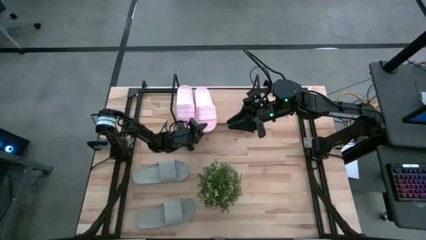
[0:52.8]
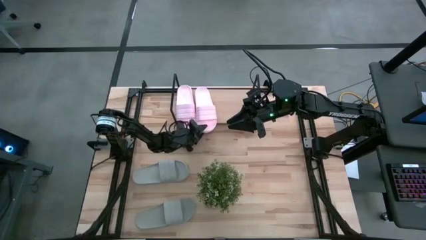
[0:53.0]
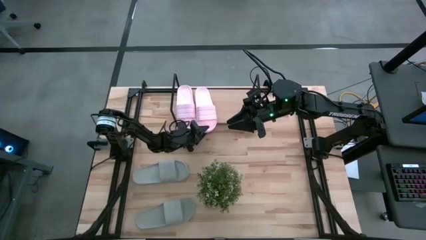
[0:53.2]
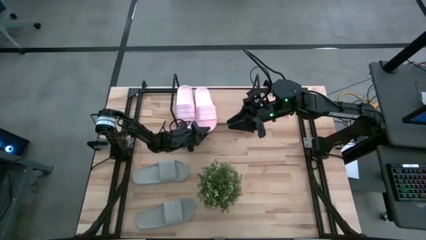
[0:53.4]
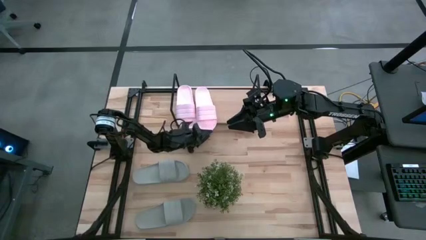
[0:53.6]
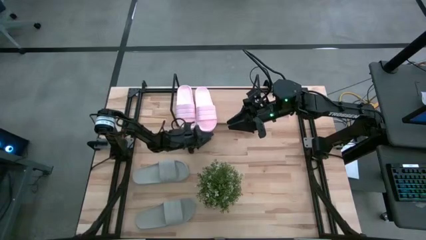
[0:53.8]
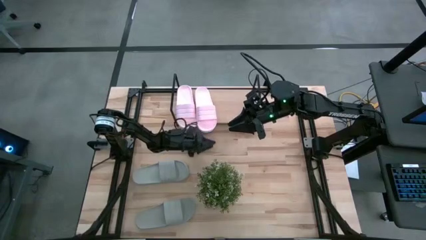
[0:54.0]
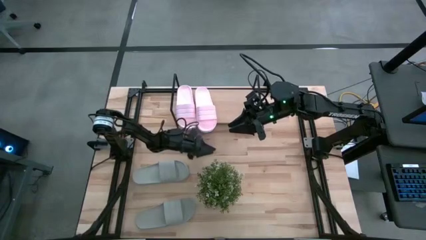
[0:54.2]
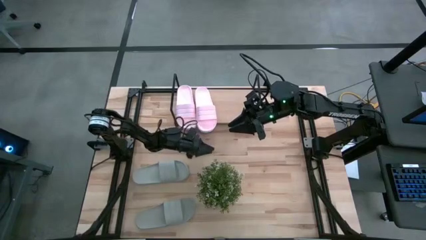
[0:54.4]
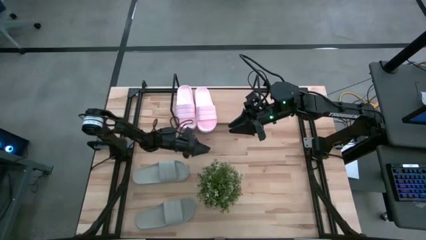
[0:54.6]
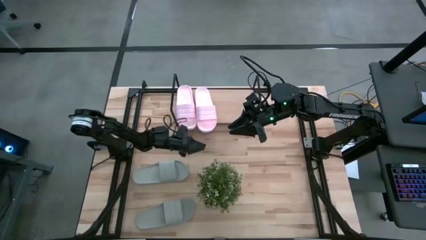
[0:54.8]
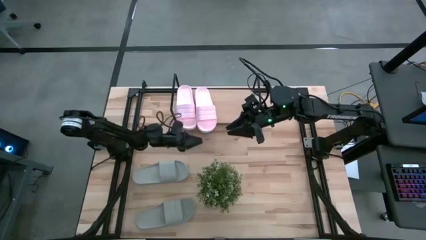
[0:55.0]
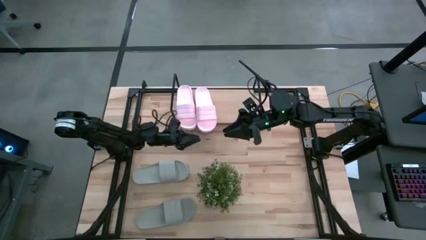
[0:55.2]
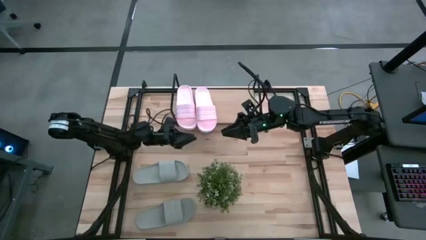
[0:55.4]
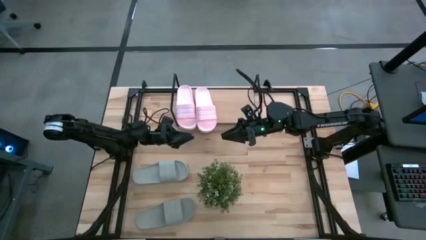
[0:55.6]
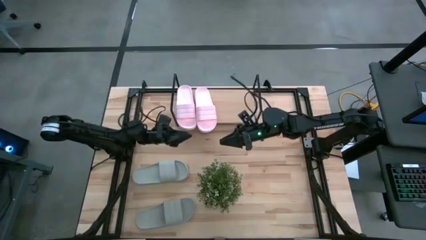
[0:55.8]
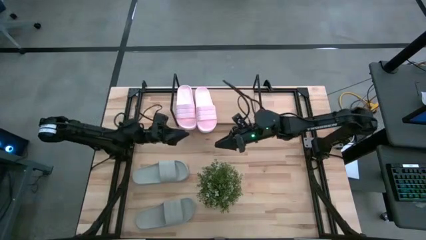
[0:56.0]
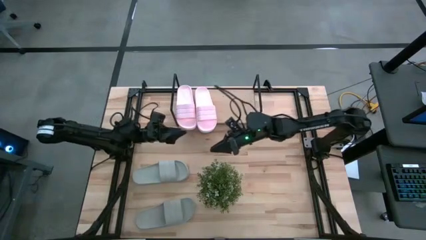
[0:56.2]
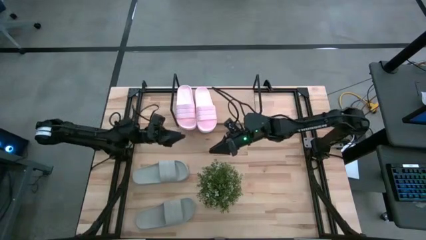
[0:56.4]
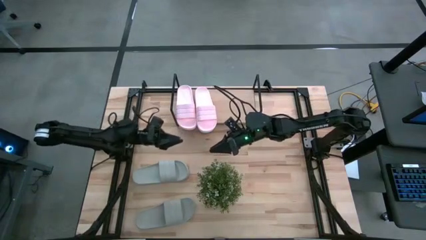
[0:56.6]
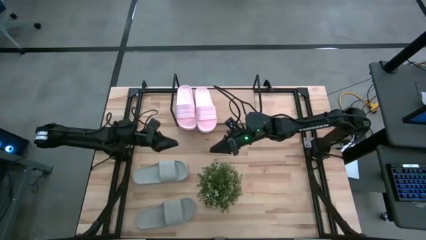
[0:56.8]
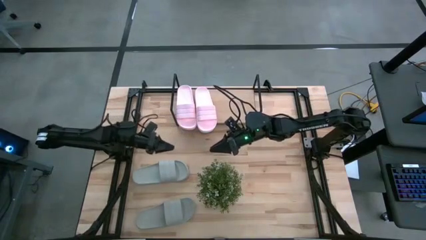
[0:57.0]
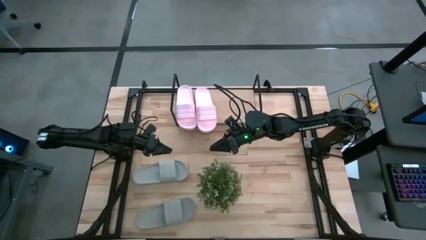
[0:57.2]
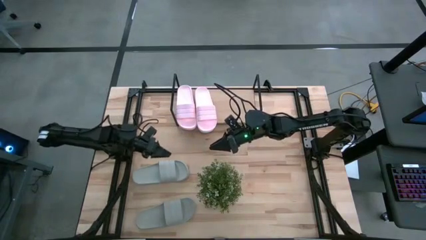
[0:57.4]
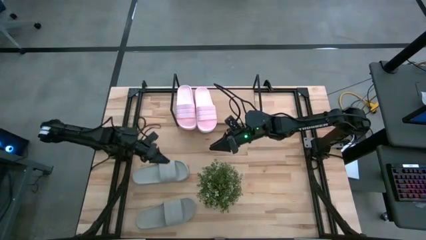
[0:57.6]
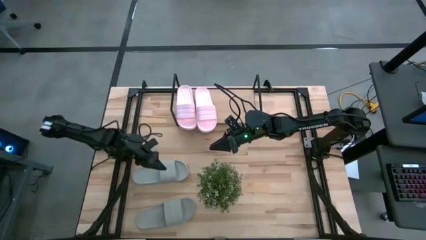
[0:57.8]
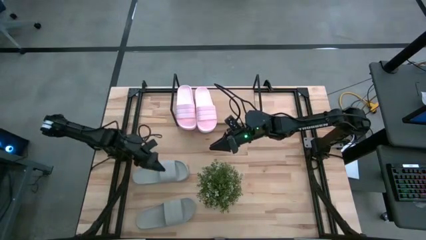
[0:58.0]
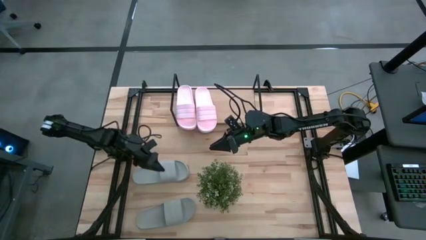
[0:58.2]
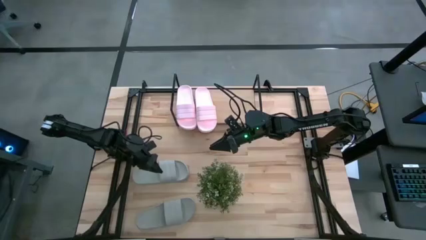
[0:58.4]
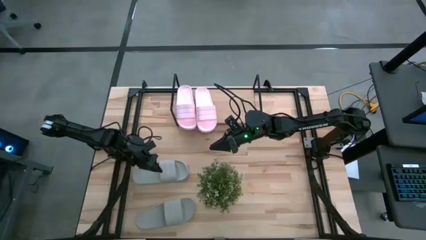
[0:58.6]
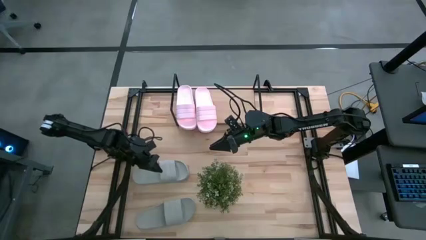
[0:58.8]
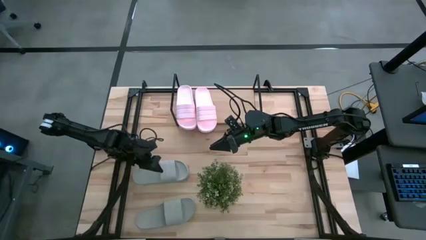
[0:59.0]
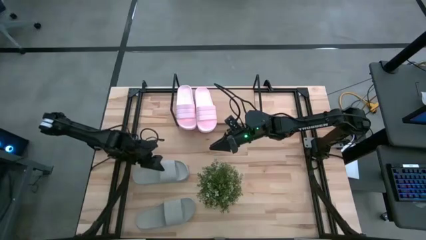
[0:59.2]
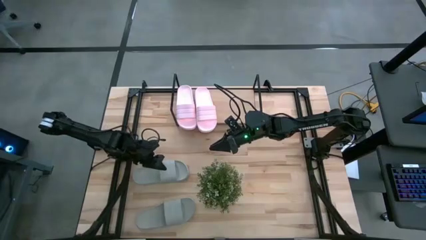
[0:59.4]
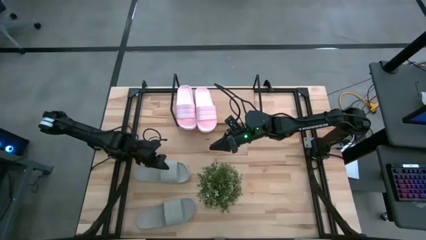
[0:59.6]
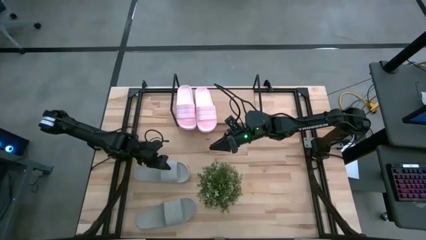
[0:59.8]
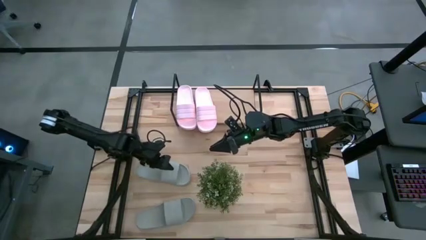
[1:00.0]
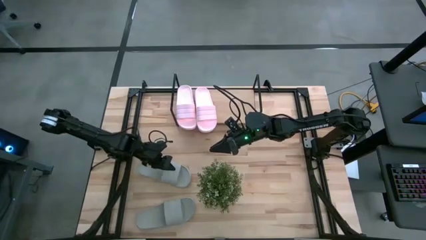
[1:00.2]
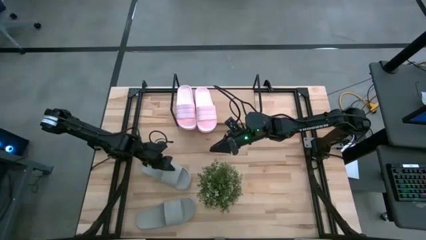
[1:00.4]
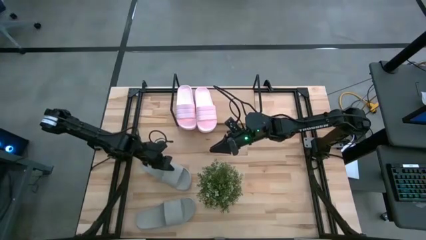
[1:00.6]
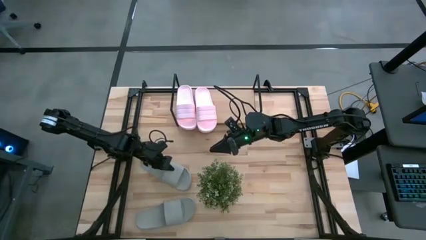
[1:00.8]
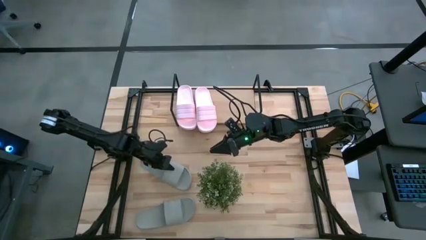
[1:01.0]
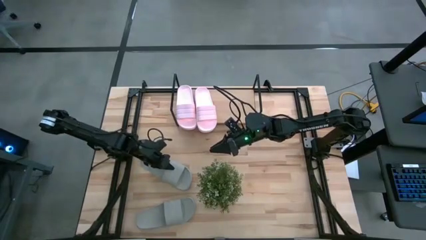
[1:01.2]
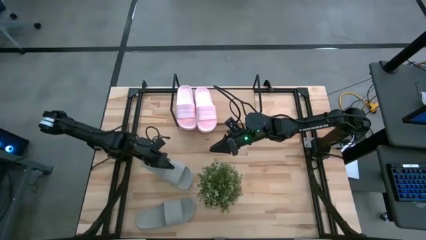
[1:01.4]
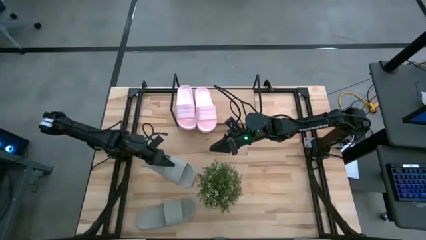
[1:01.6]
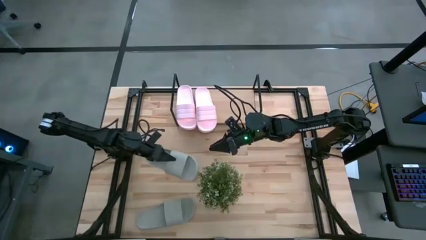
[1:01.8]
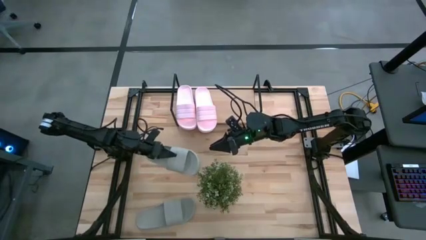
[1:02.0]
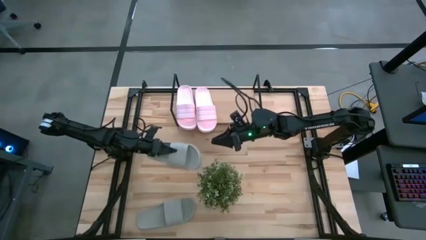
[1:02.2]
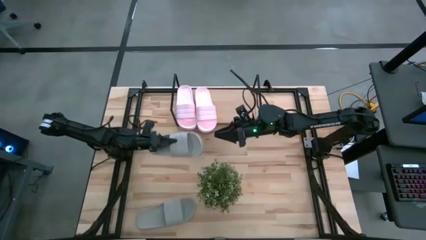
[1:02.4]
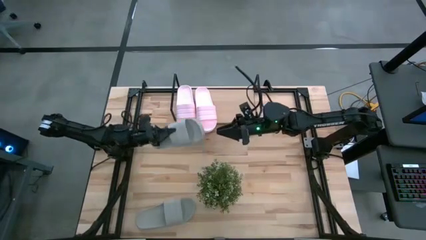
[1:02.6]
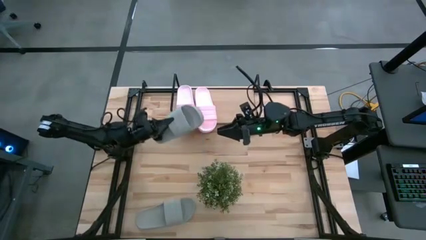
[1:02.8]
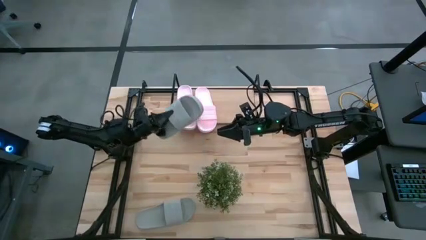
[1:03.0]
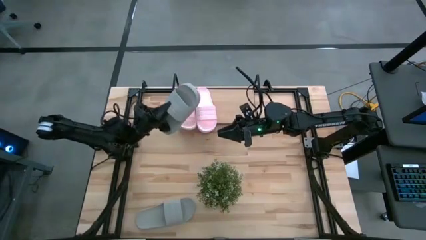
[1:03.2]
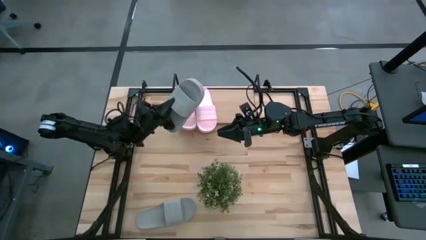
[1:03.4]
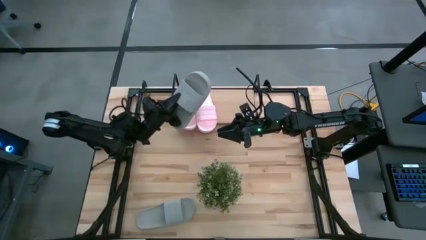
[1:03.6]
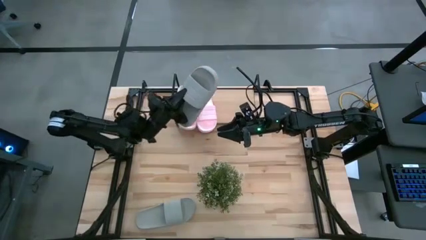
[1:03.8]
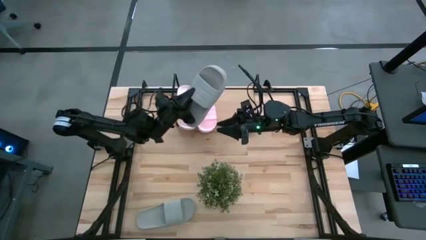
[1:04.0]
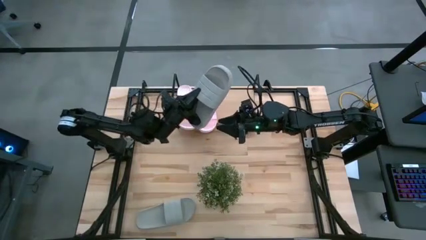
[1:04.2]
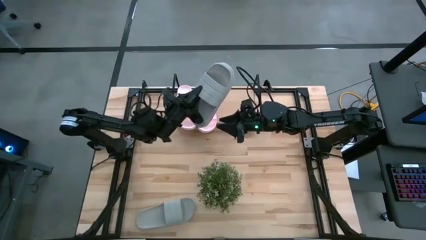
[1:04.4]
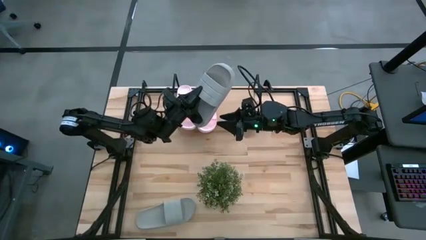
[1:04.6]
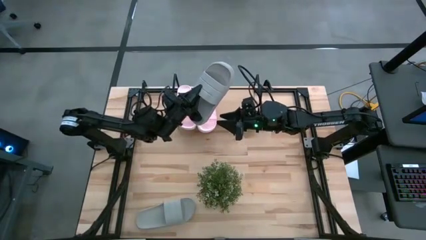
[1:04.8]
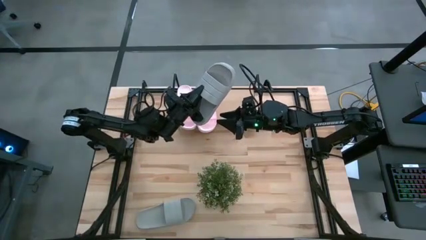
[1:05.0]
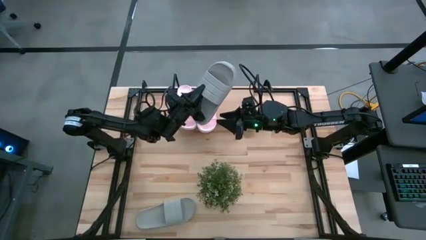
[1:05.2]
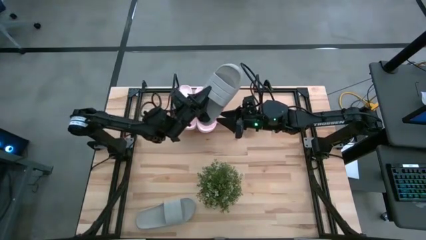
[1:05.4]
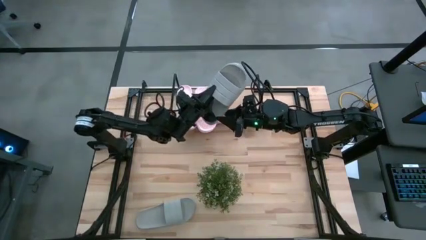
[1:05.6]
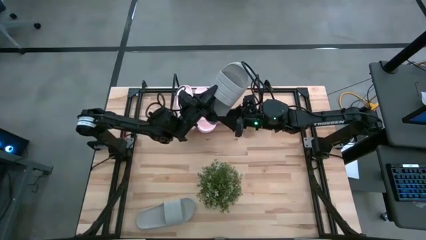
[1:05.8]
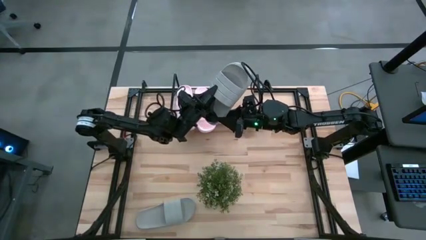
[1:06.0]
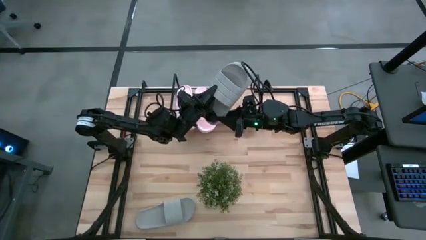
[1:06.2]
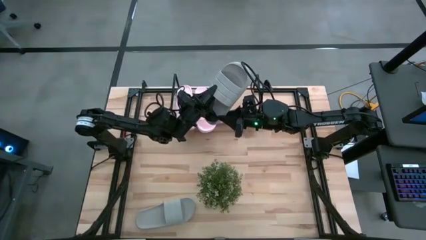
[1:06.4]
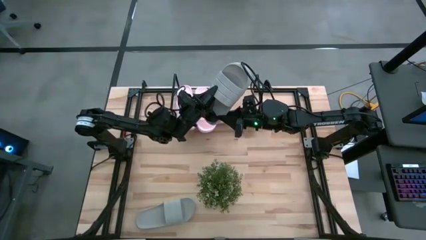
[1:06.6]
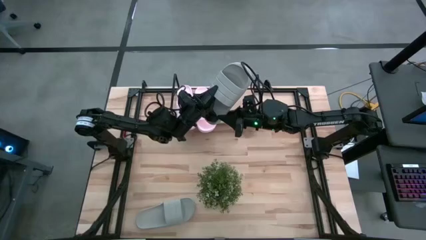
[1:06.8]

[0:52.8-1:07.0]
Task: Pick and place slides into the shelf
Put the top gray slide on the shelf

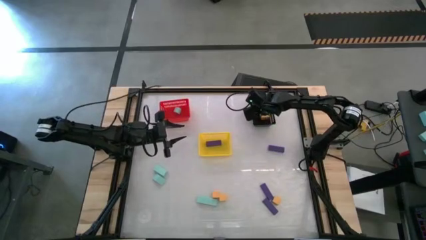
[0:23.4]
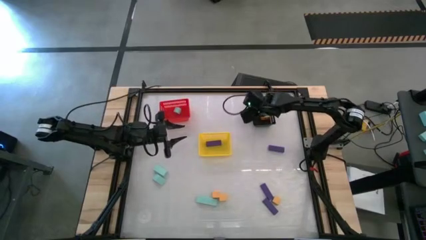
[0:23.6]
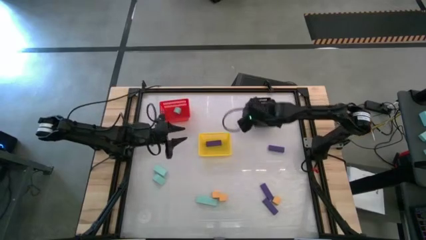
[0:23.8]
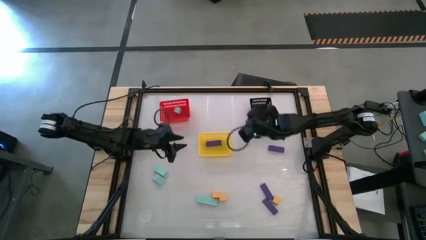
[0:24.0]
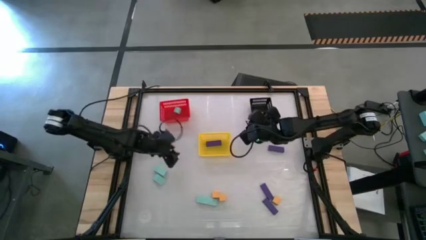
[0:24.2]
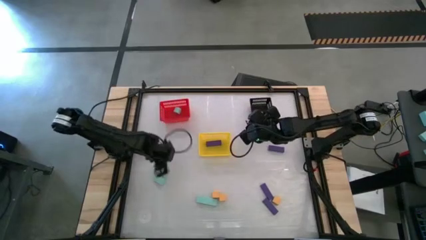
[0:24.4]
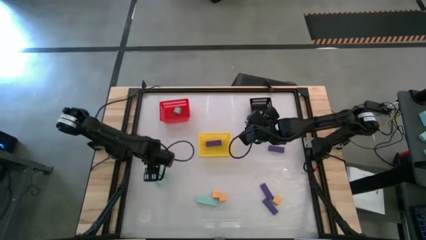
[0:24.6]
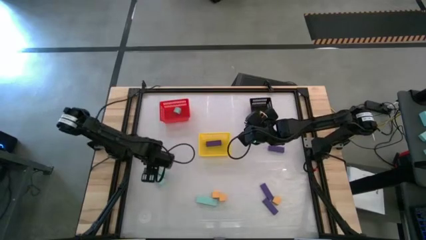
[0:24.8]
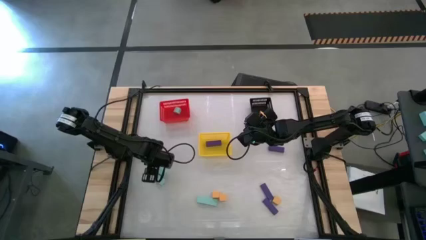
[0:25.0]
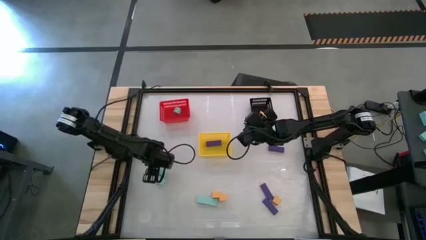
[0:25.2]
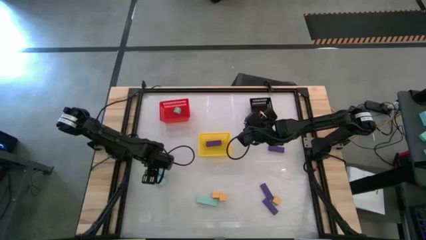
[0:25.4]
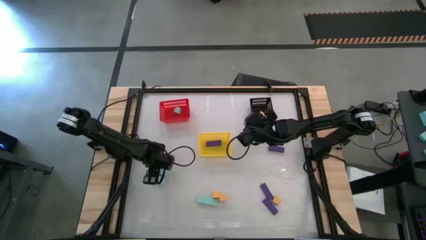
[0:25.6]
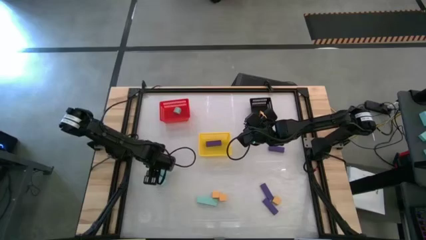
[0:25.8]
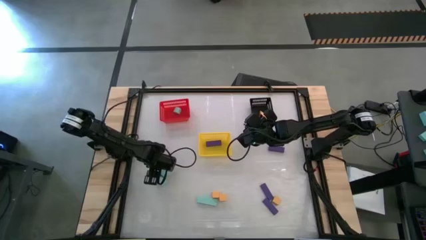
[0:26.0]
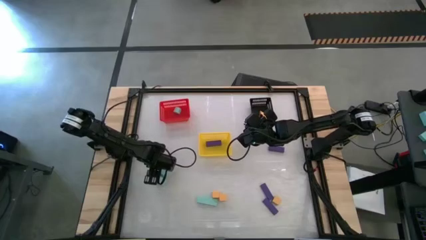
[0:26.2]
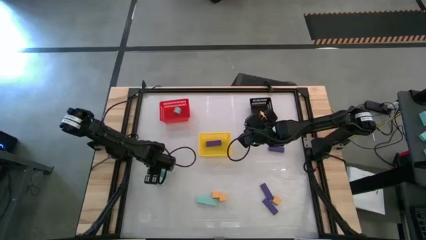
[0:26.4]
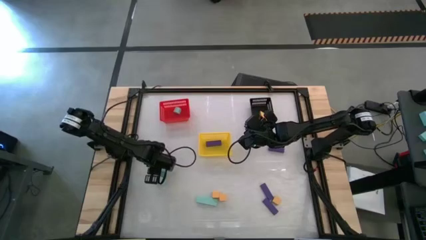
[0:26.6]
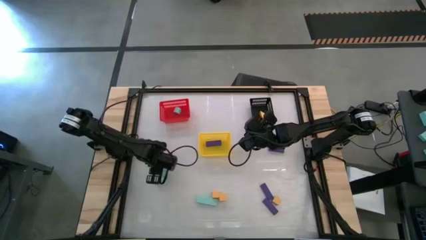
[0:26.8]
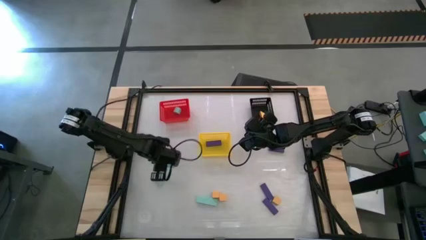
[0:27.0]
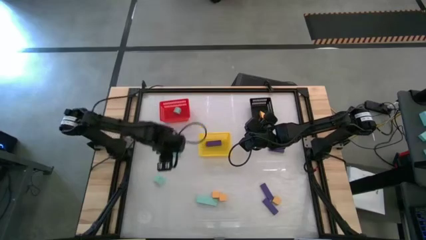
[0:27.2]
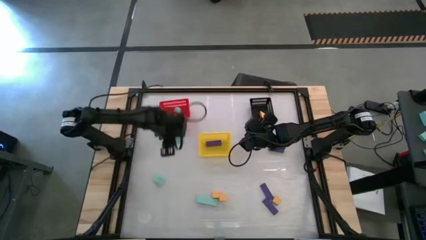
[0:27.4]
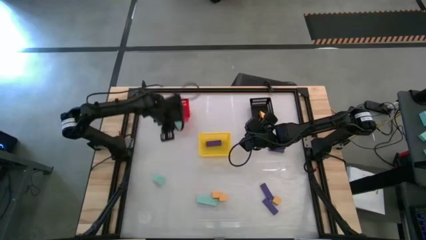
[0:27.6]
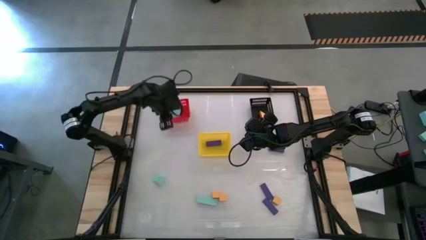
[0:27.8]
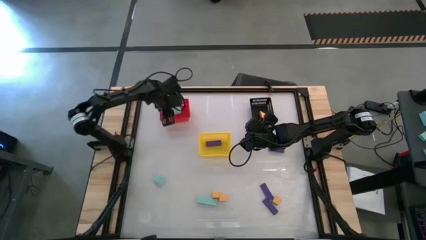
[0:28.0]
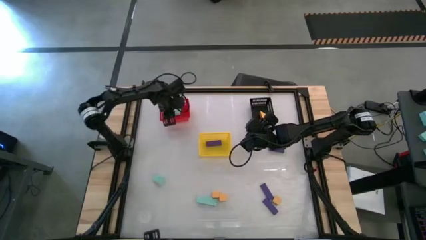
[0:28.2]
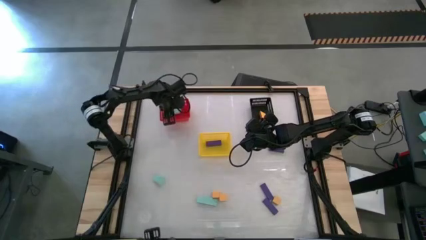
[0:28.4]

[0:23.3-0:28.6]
Task: Sort & place blocks by color
Put the light blue block into the red bin
